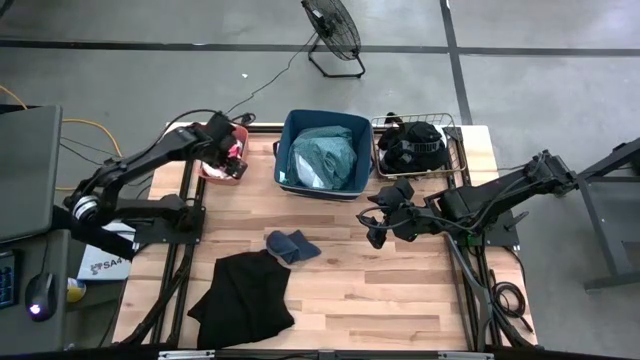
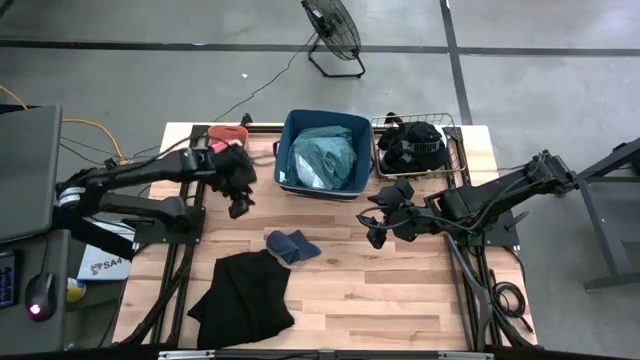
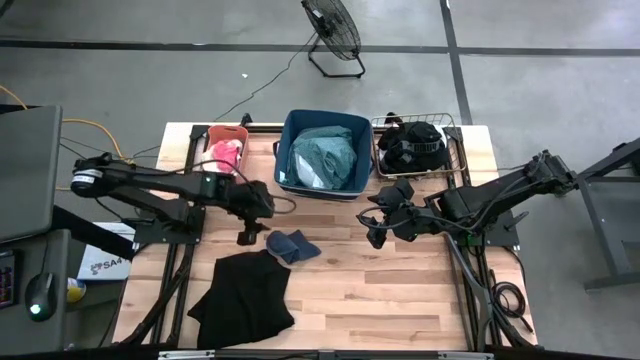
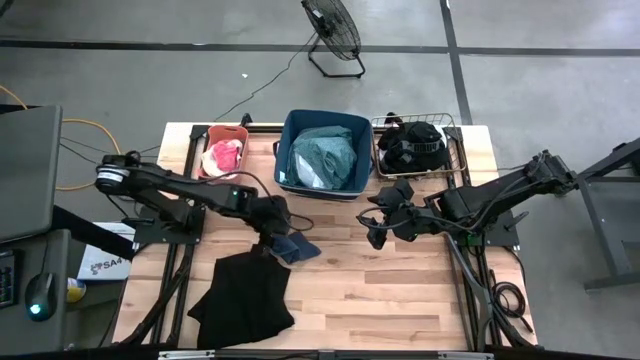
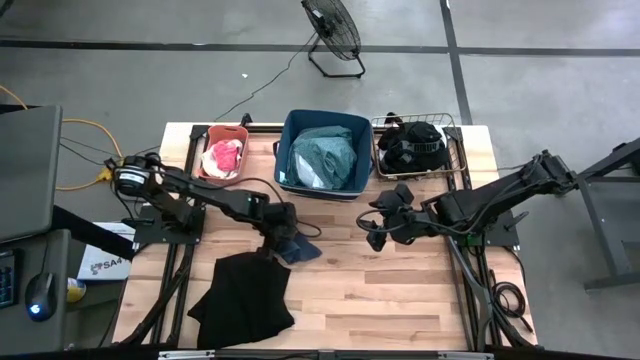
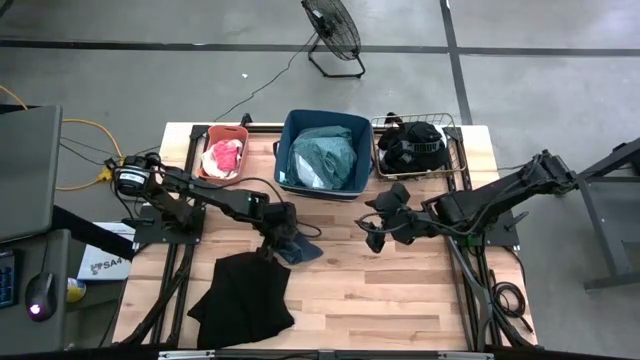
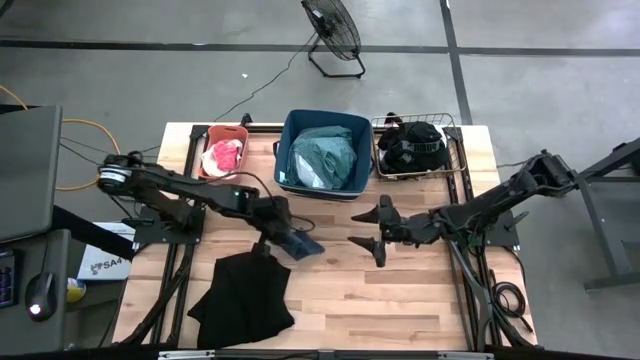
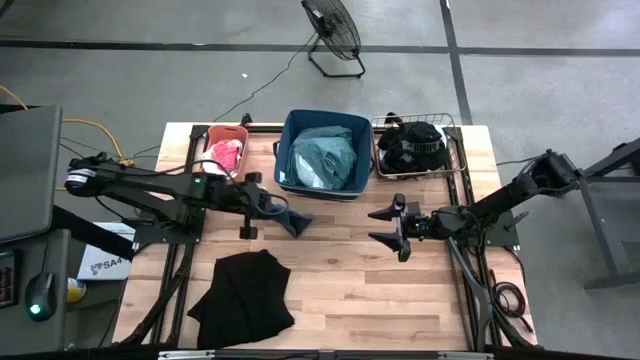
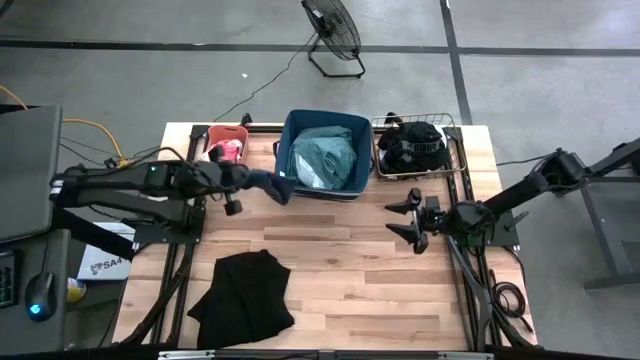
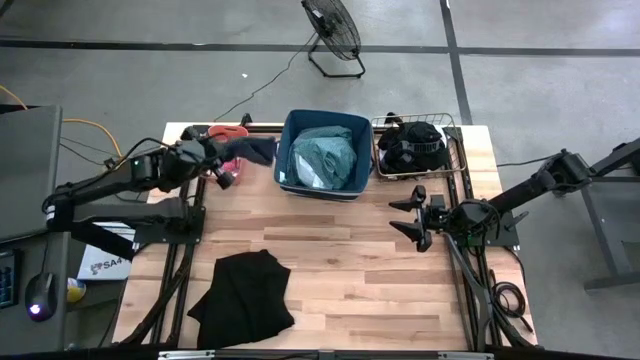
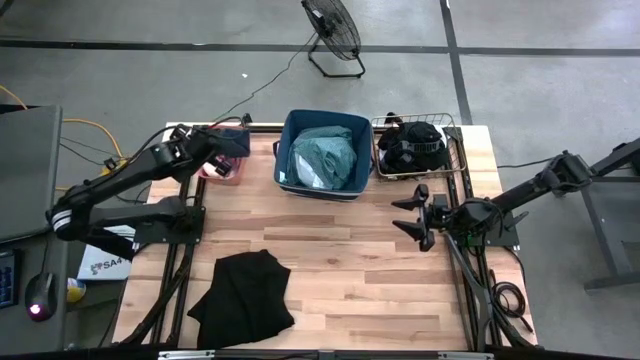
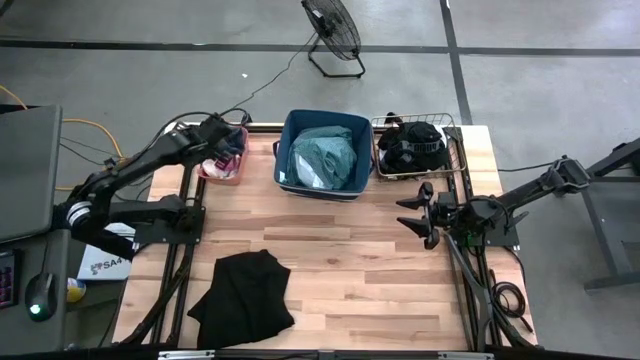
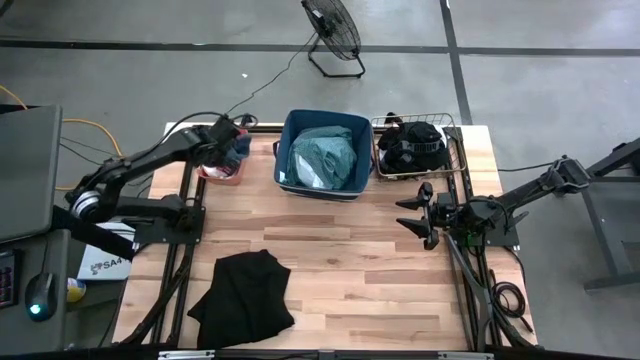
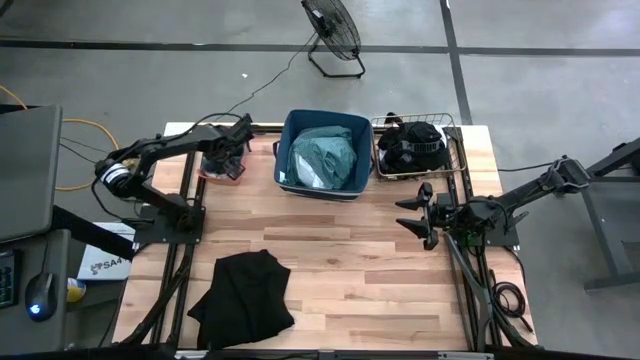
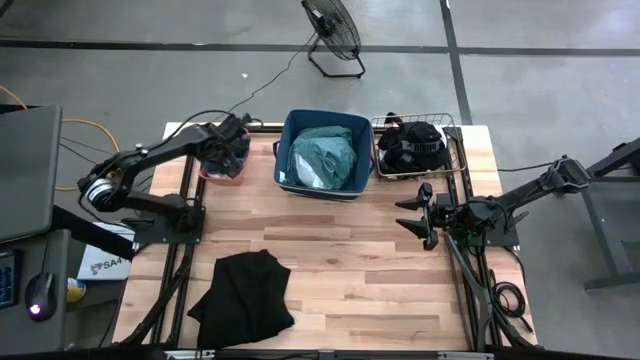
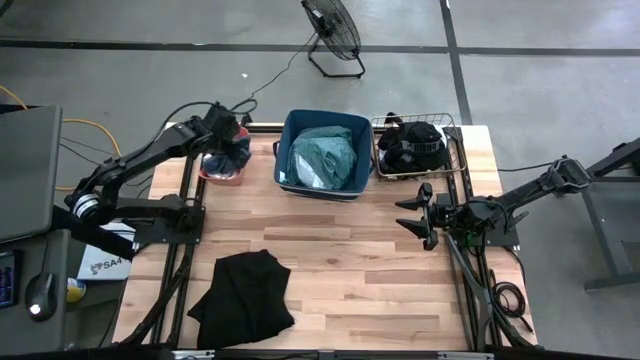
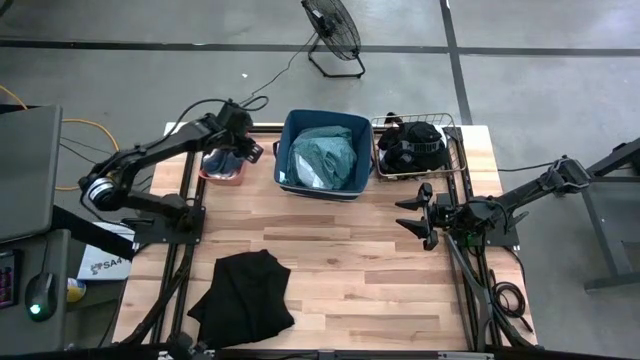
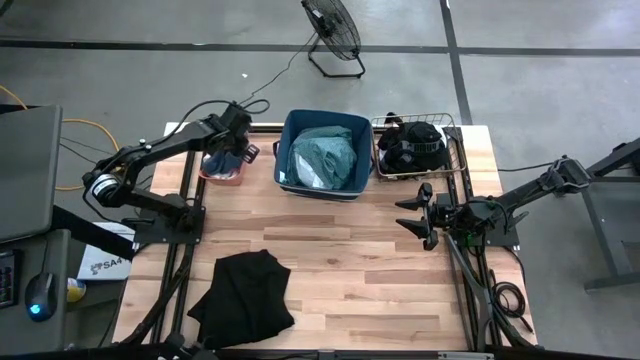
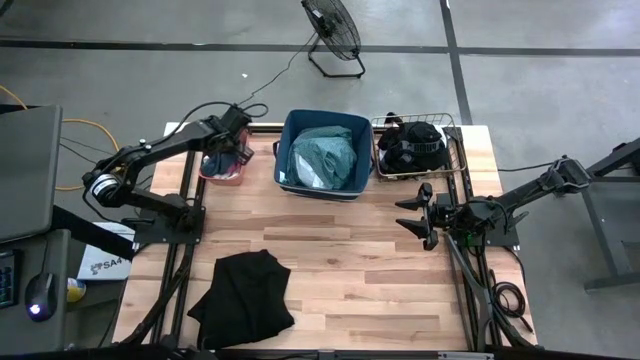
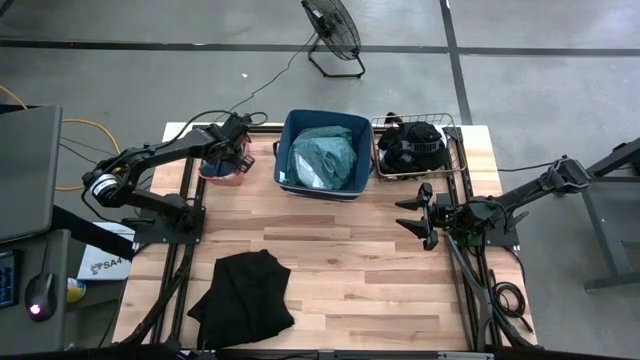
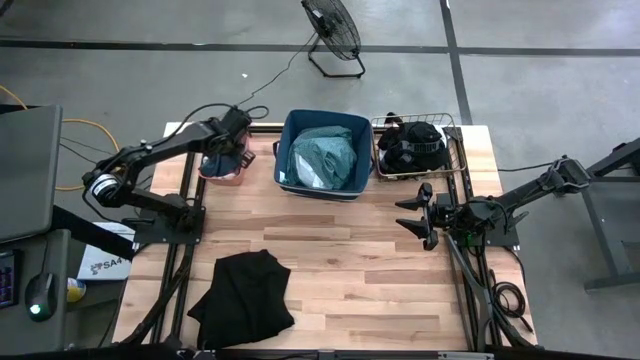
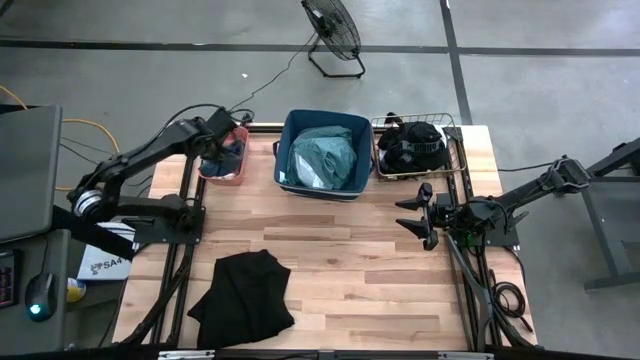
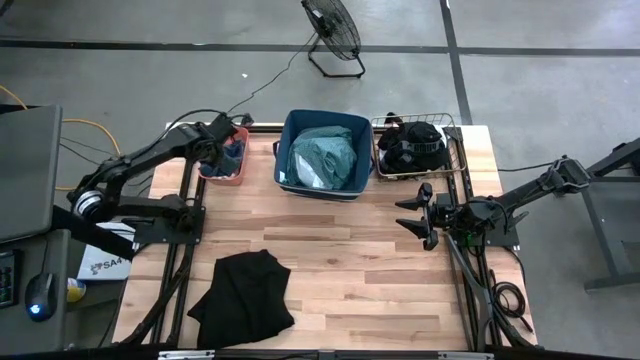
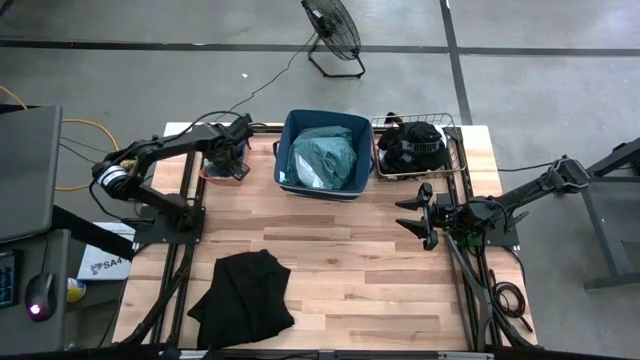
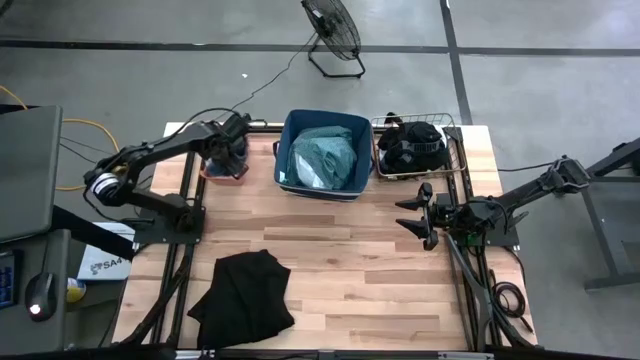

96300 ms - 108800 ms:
Task: Pick & Place Cloths
Put the blue sock into the orange bin

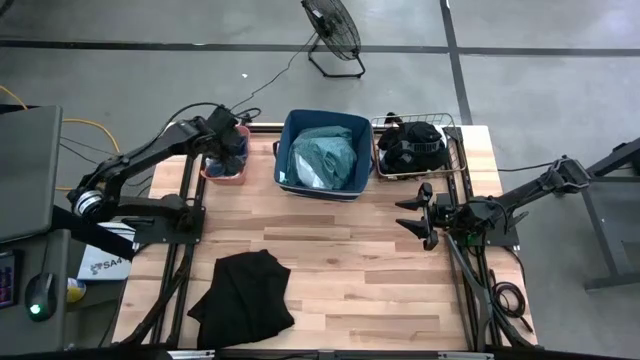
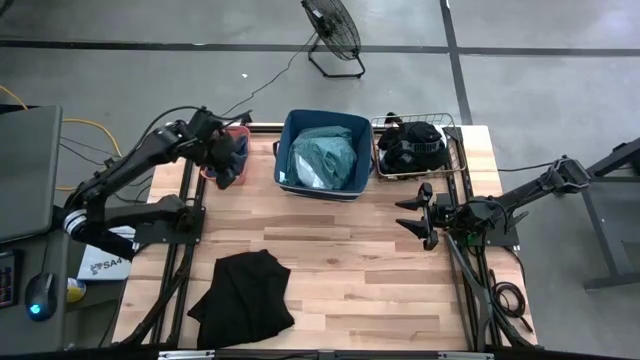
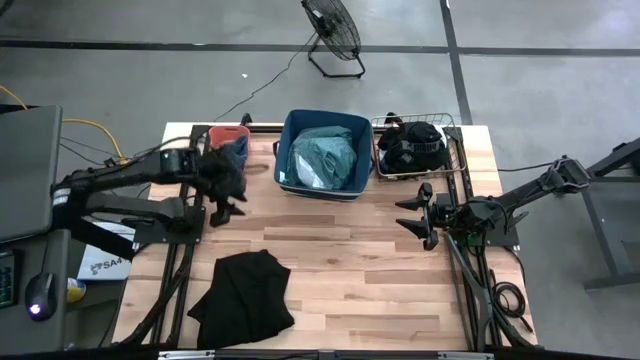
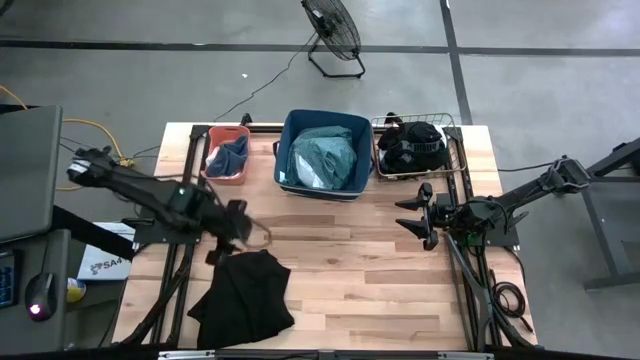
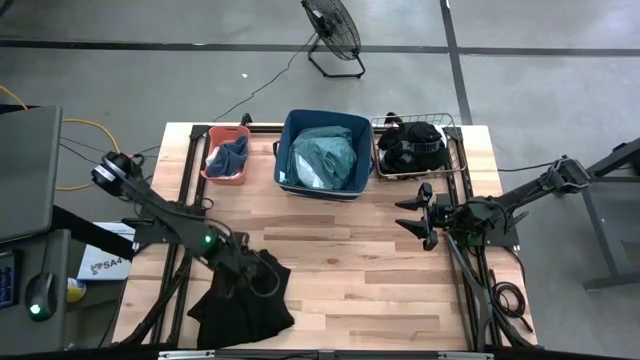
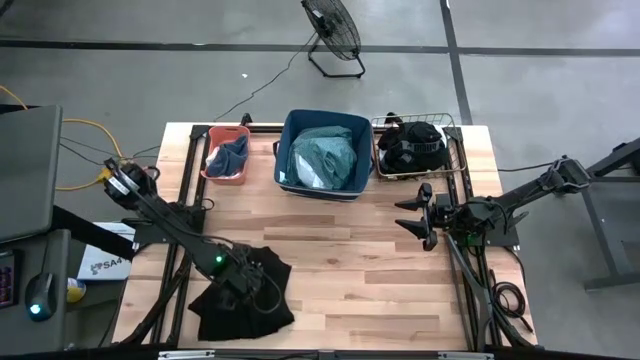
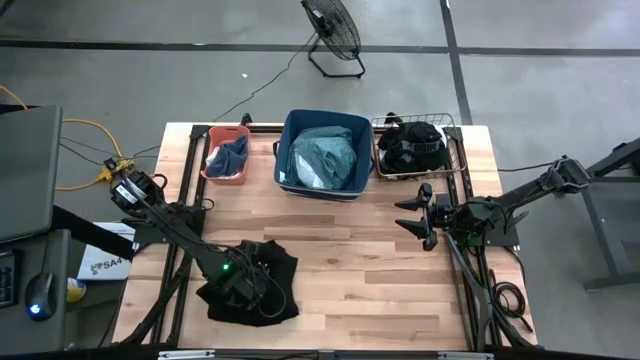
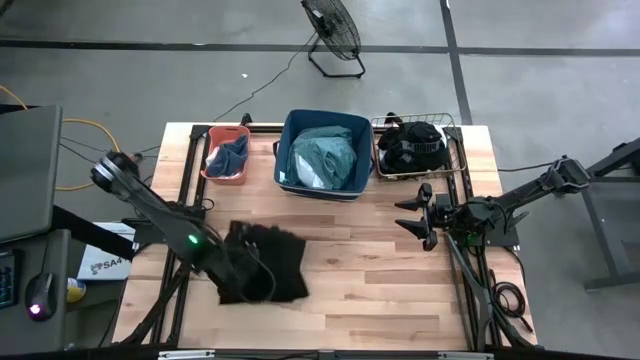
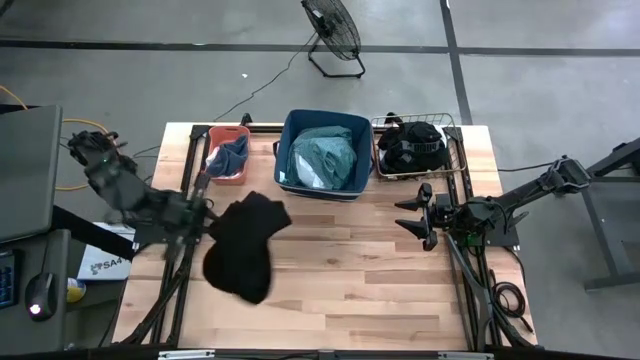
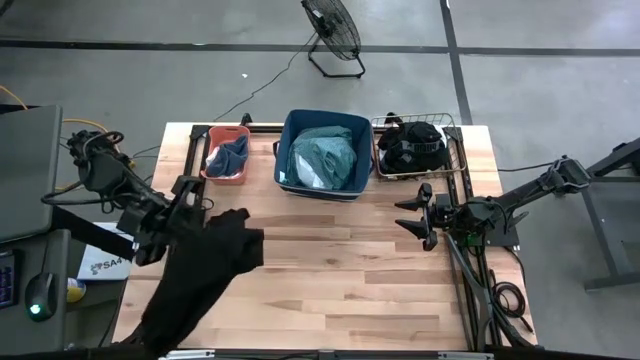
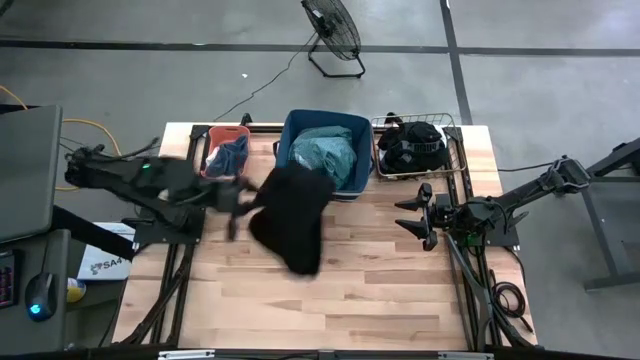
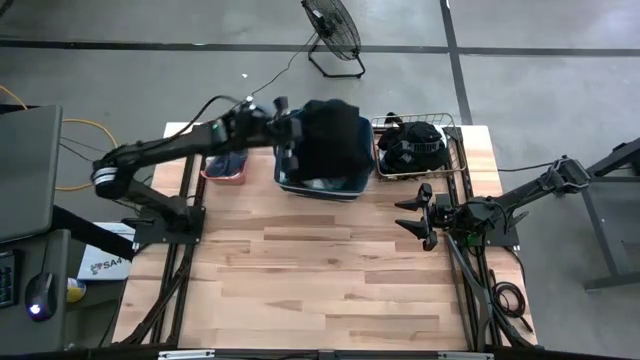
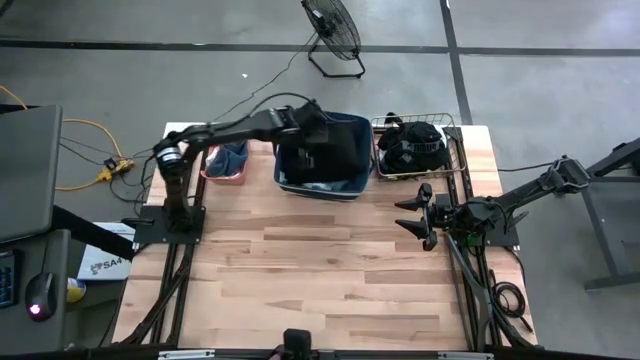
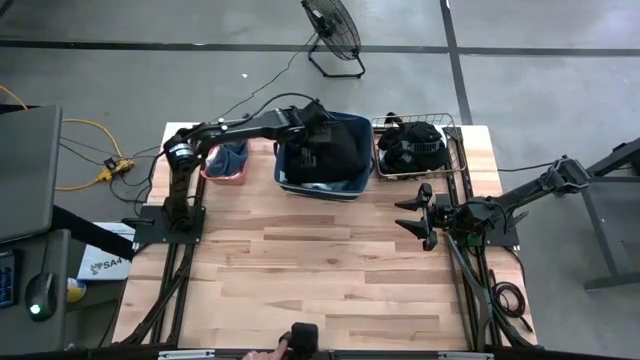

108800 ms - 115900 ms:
Put the black shorts into the blue laundry organizer

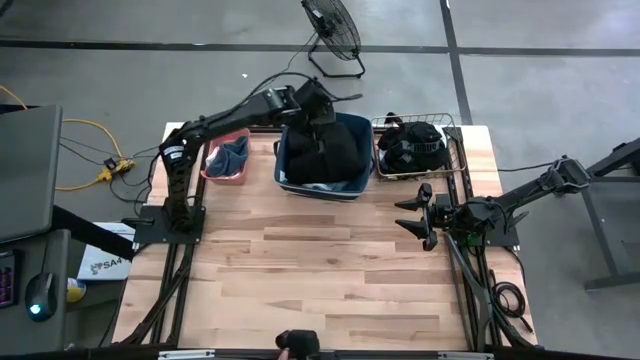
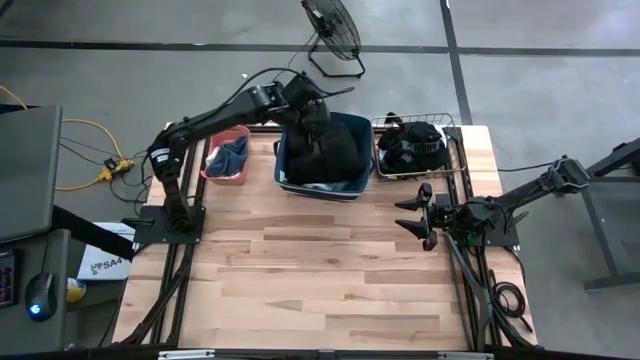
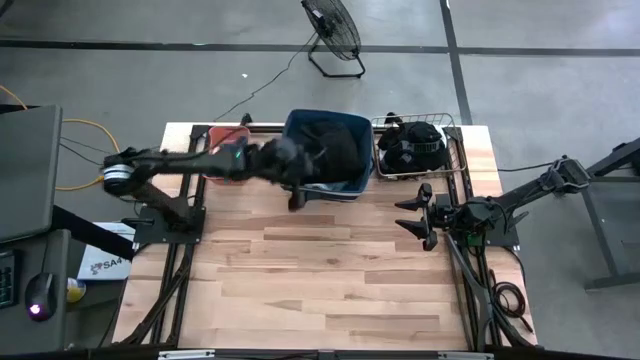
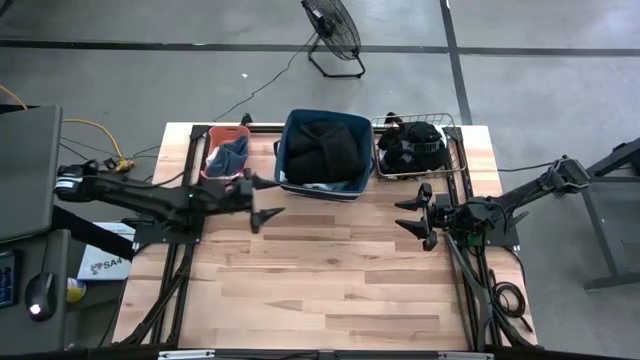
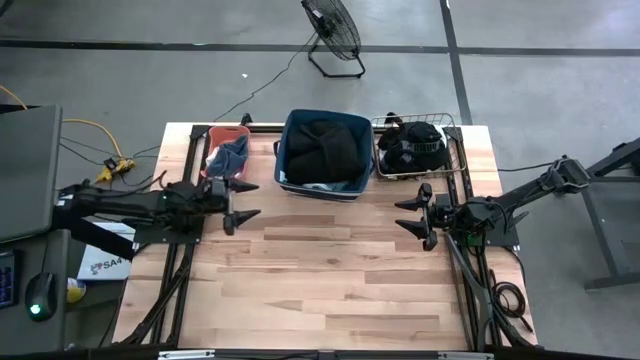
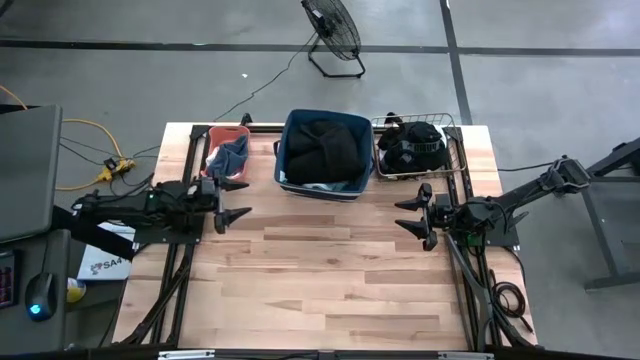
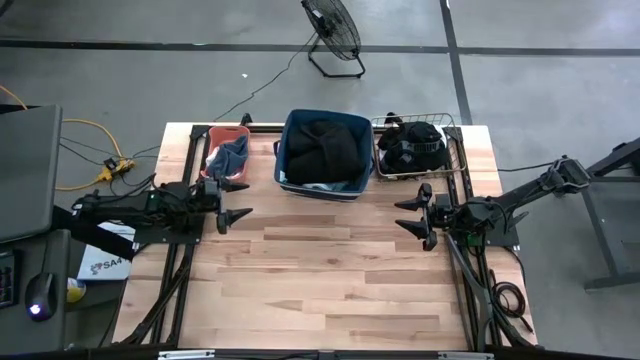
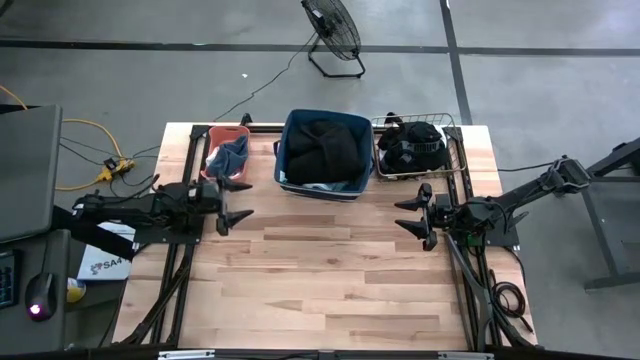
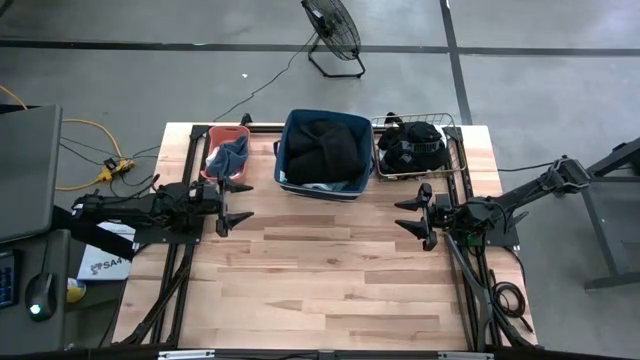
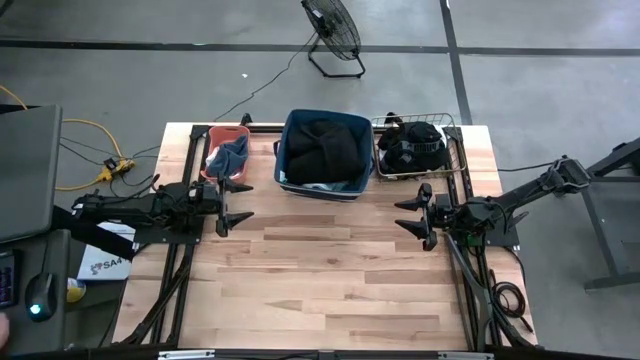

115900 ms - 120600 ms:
Return to Home Position
